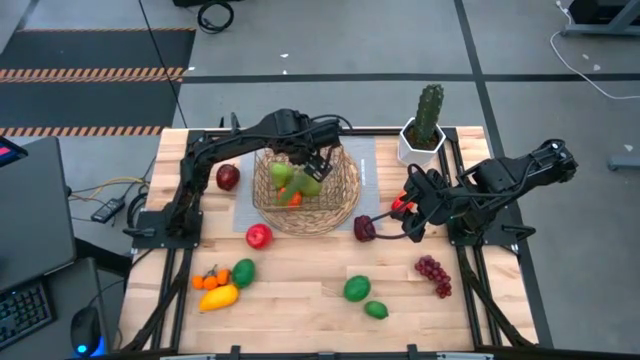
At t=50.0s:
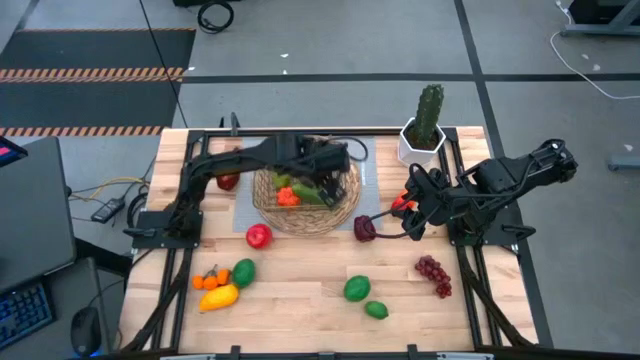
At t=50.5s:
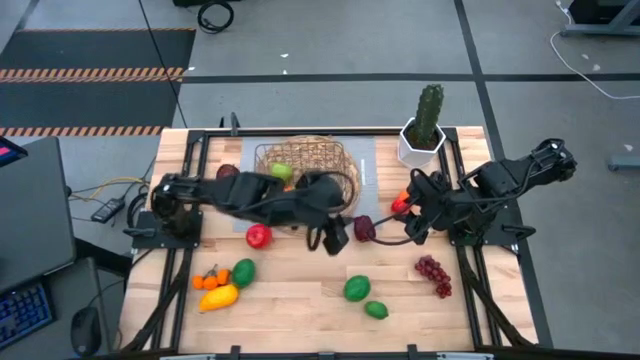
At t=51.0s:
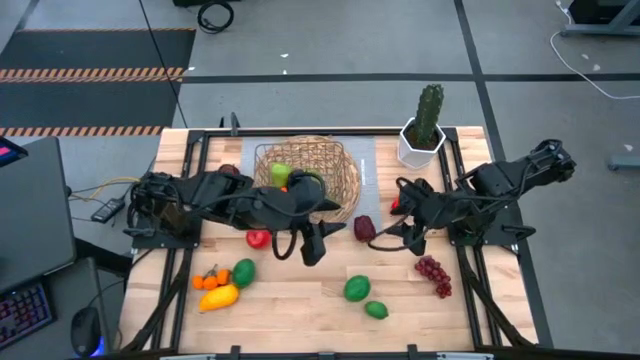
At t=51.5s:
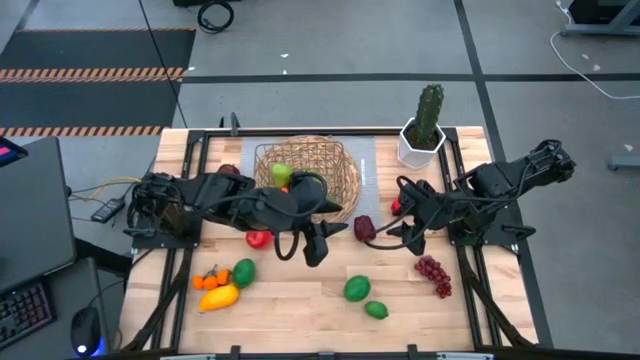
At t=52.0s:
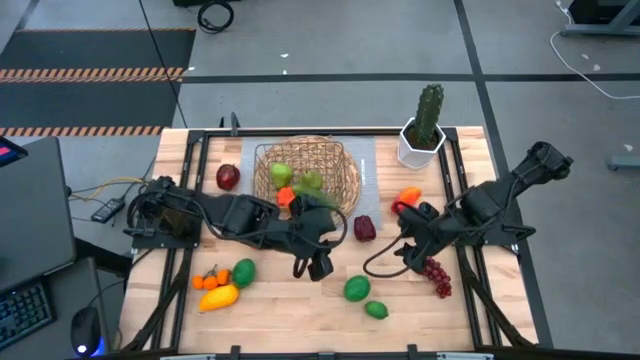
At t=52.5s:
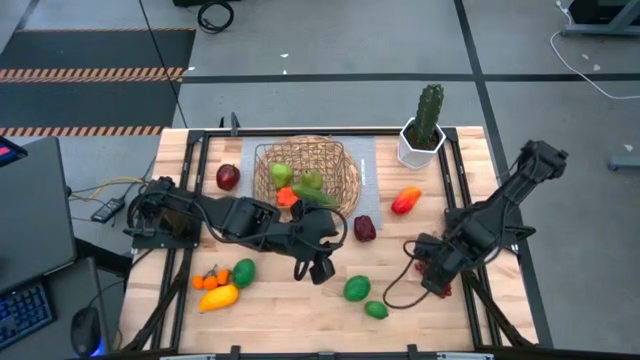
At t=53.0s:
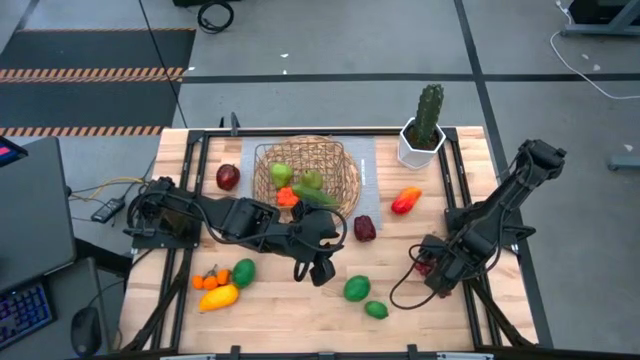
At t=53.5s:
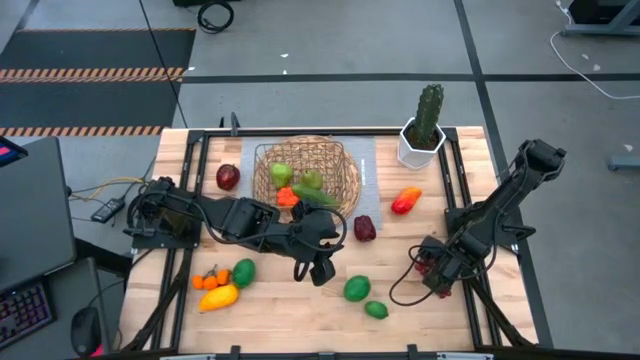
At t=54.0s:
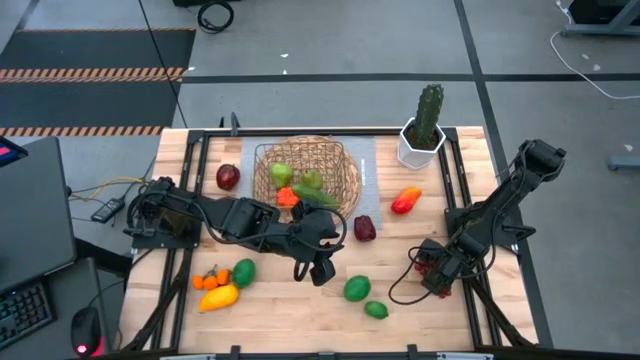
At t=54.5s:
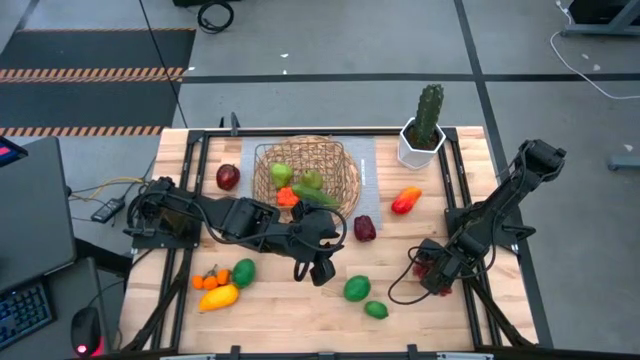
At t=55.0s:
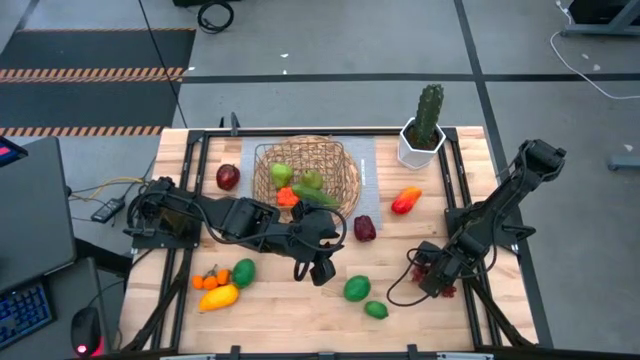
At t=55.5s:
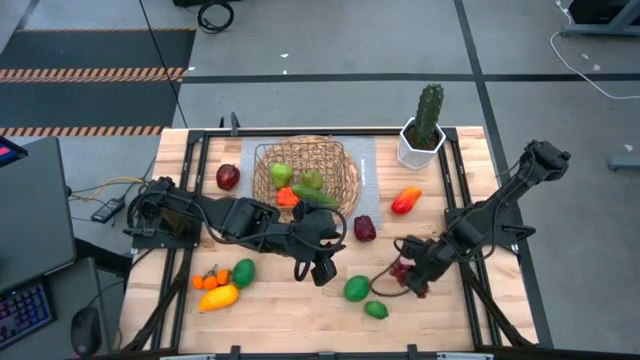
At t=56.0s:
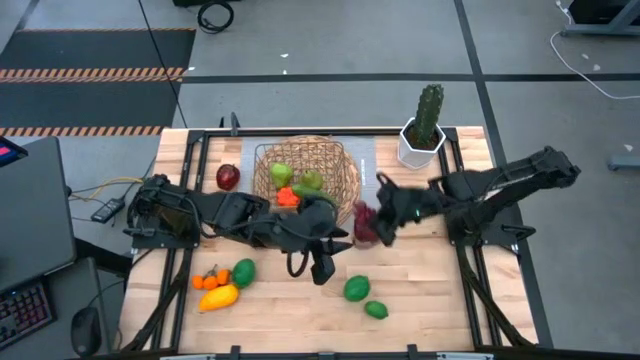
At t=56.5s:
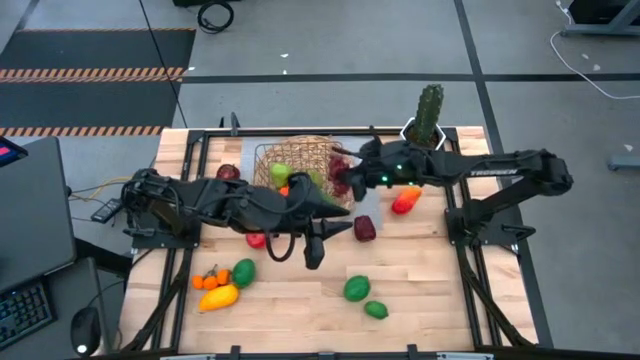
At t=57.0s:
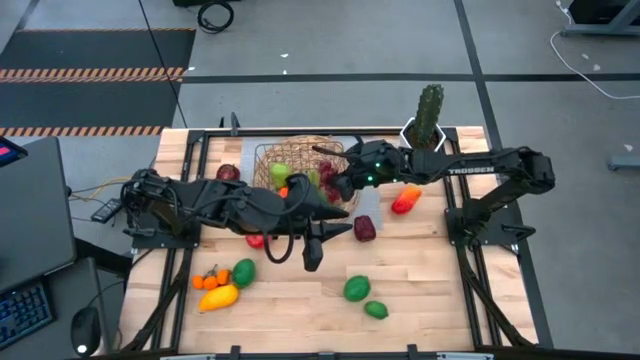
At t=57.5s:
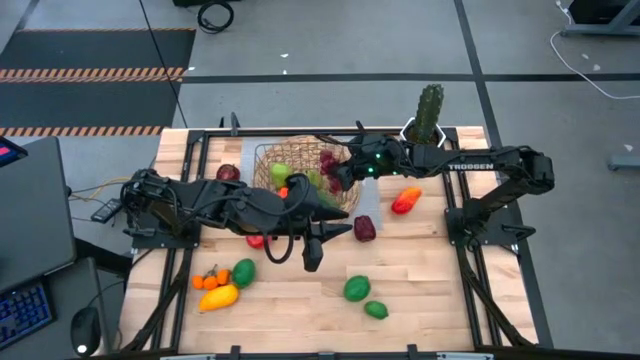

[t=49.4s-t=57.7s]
Task: Build produce basket
Put the grapes into the gold wire basket

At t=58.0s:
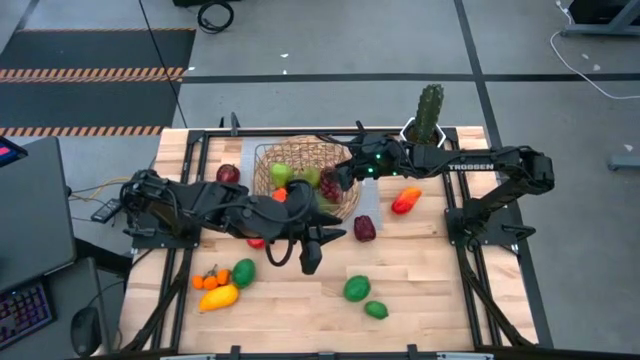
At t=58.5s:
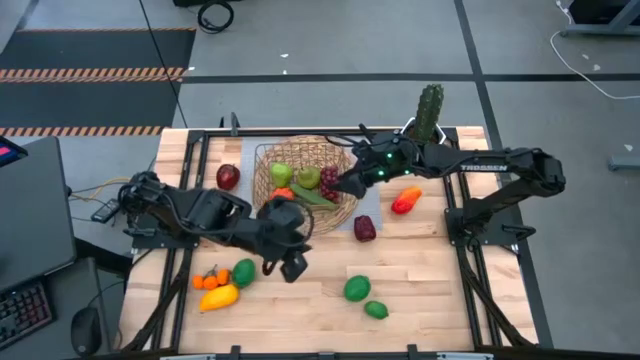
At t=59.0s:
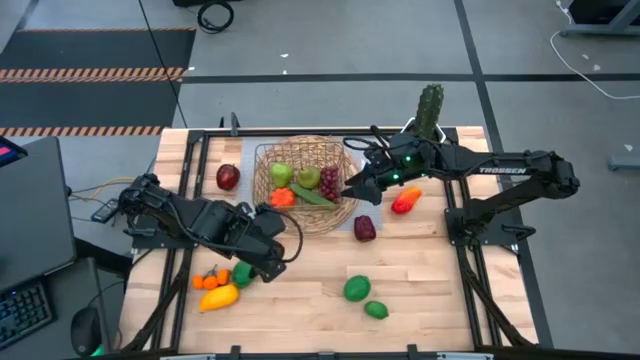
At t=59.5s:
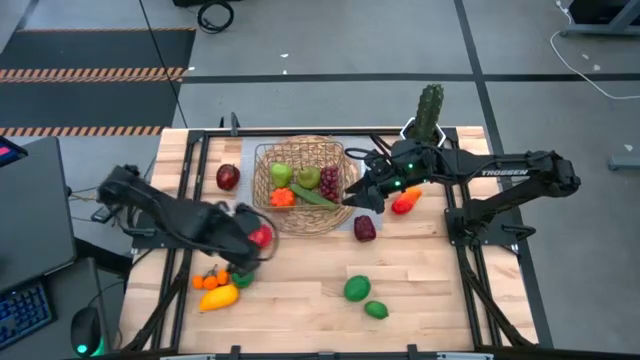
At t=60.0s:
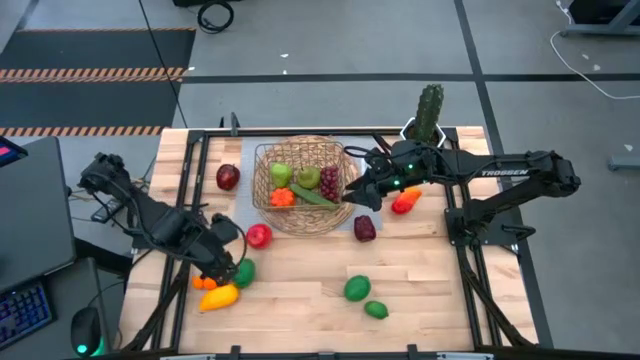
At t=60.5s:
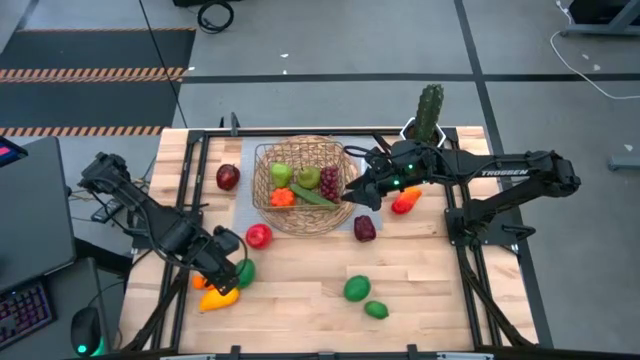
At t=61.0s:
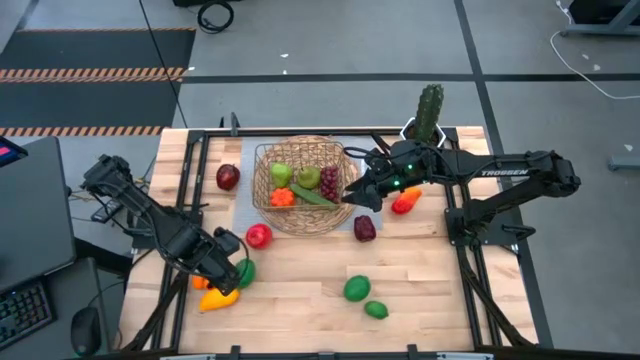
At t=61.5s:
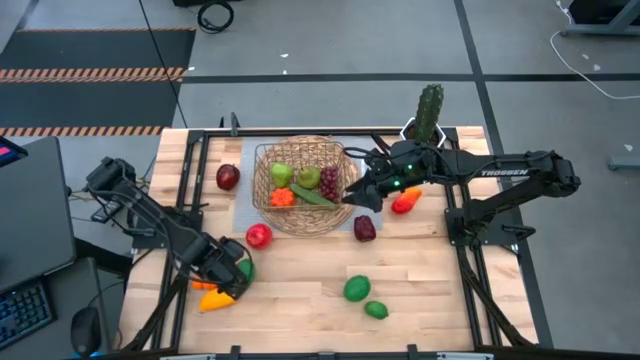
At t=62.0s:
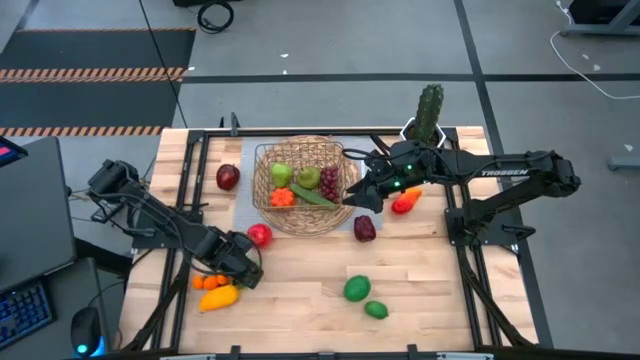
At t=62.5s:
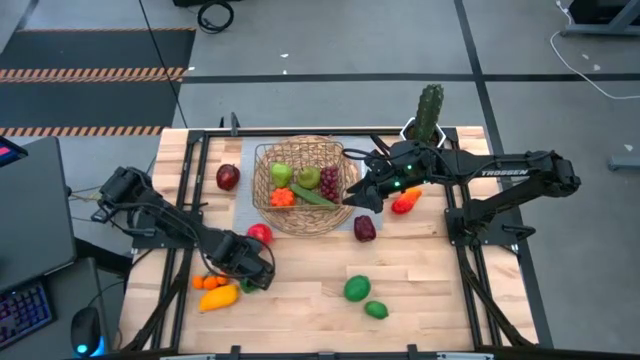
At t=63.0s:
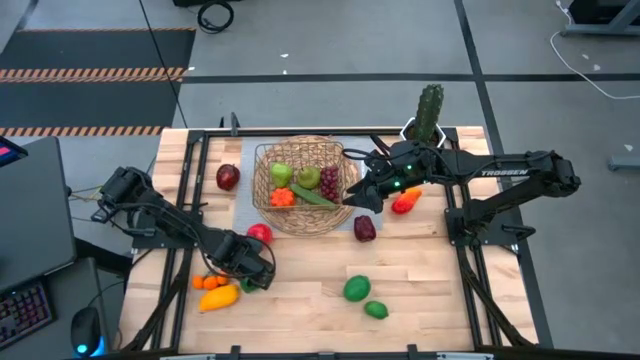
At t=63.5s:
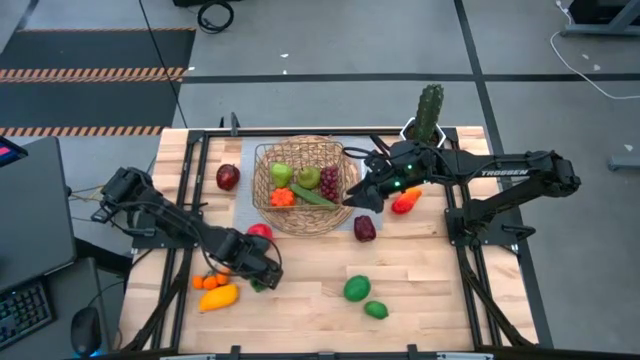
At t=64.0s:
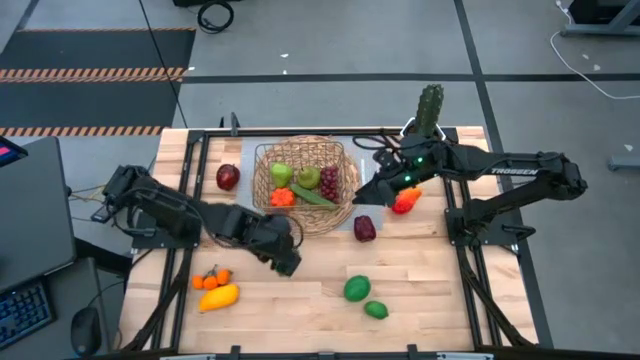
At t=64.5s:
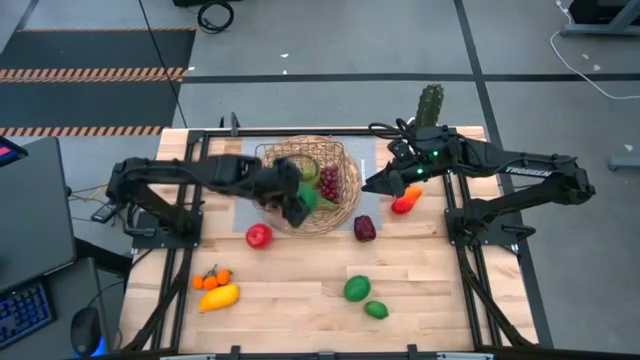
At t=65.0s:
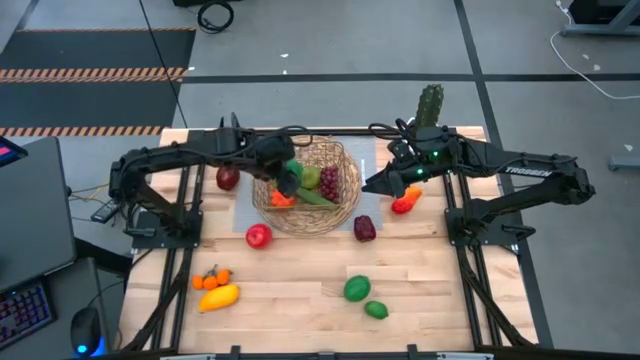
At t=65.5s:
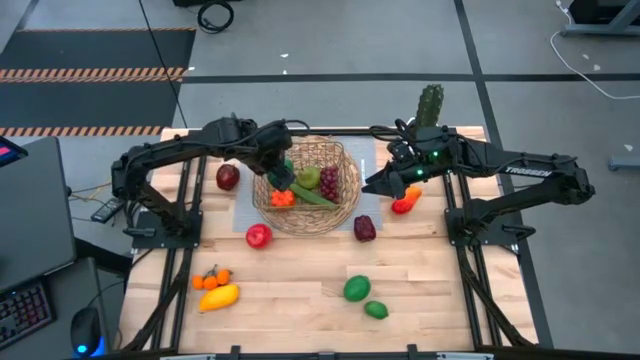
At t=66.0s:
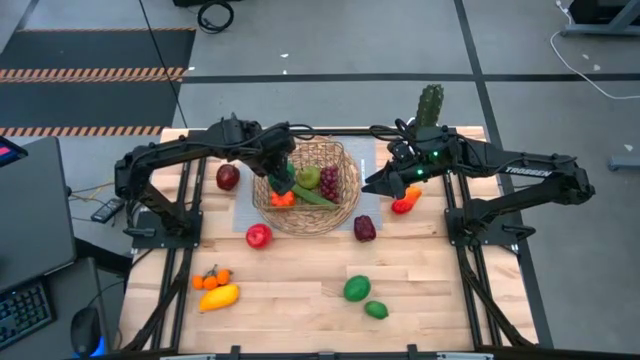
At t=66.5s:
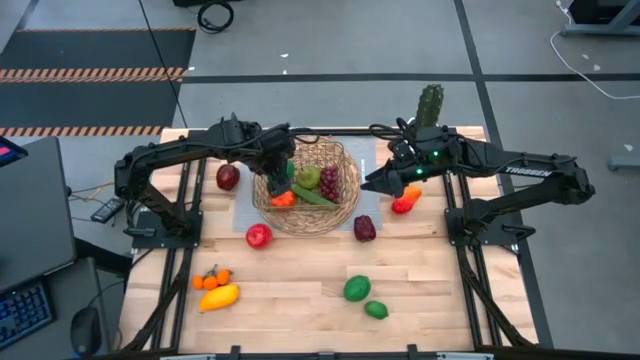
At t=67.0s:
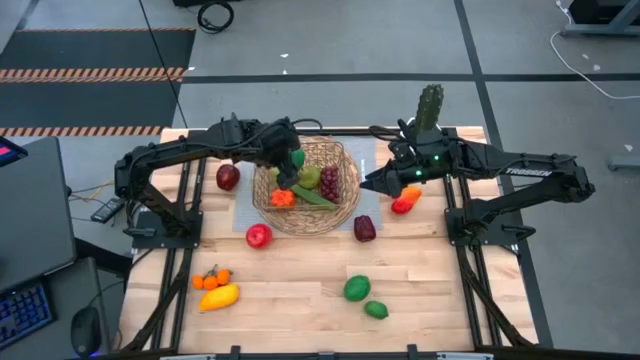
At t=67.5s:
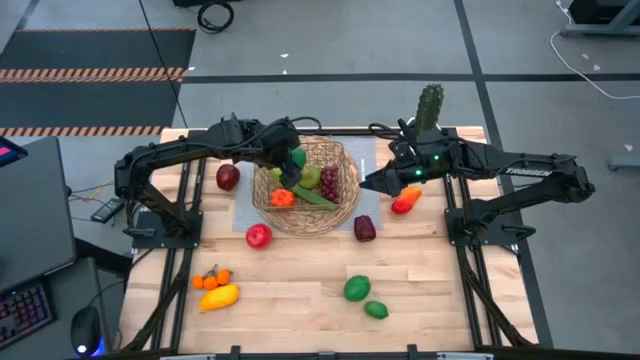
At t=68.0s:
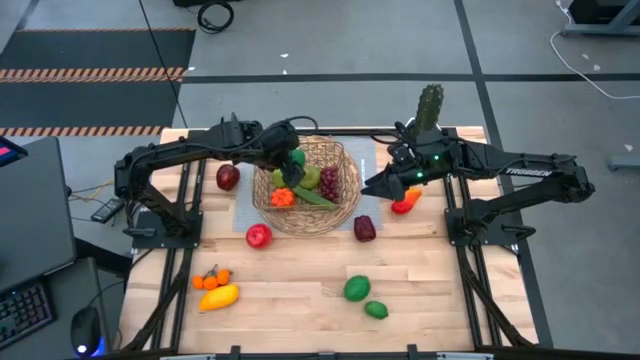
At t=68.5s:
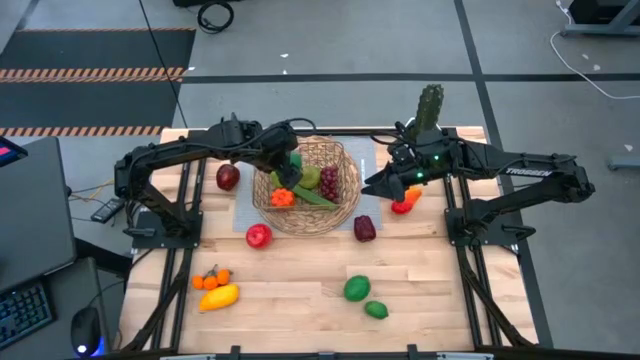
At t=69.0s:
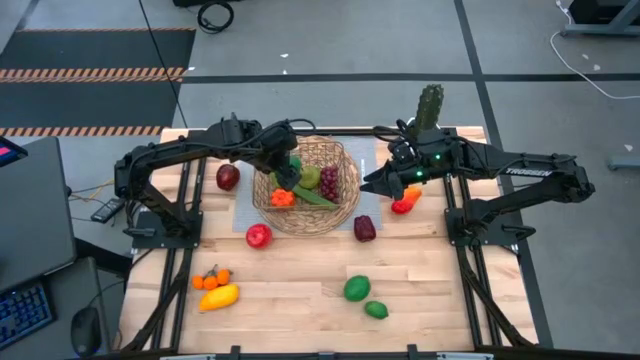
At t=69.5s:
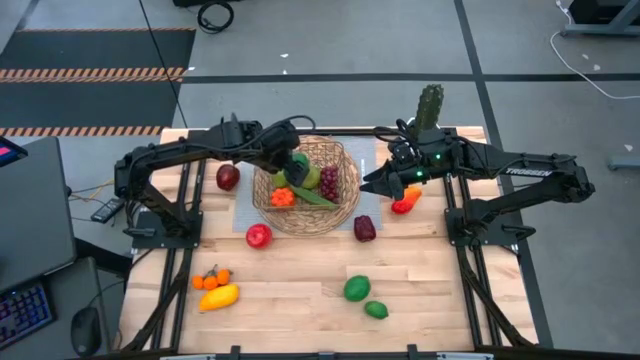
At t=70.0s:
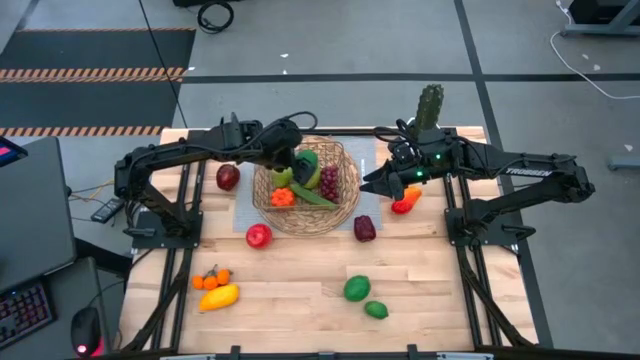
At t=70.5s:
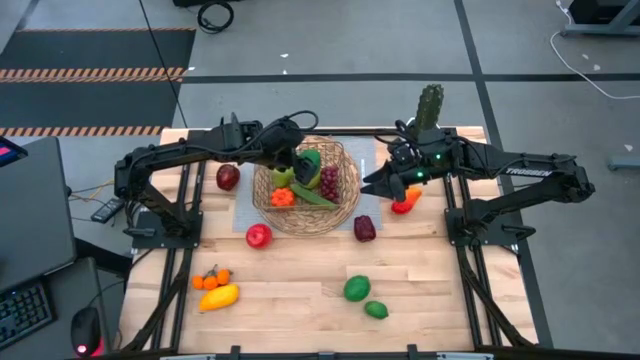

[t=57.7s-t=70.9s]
Put the left lime into the gold wire basket
